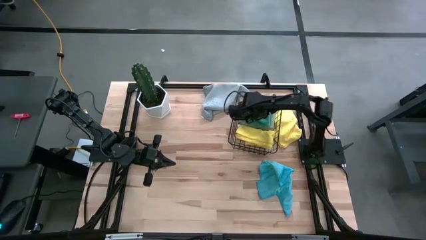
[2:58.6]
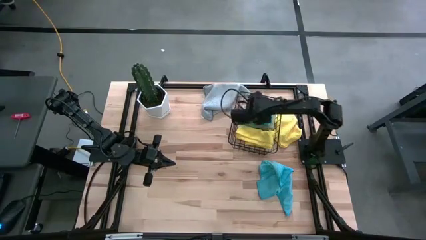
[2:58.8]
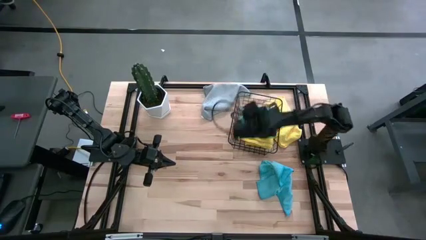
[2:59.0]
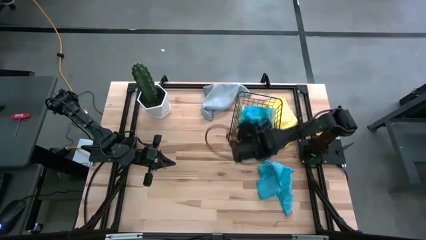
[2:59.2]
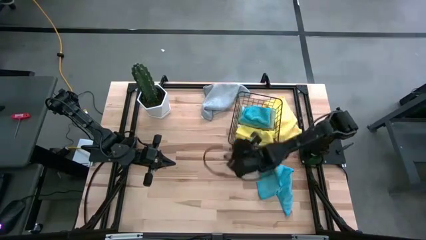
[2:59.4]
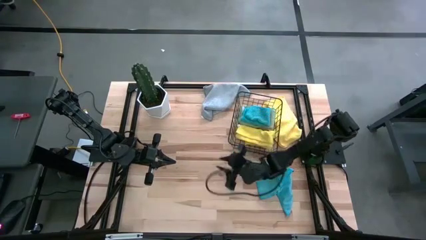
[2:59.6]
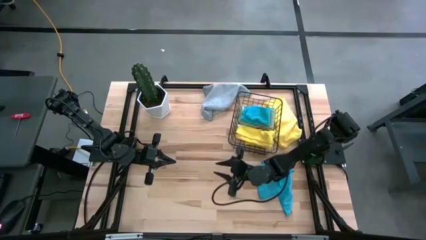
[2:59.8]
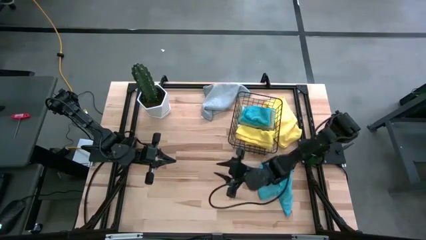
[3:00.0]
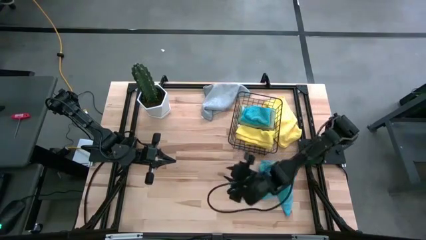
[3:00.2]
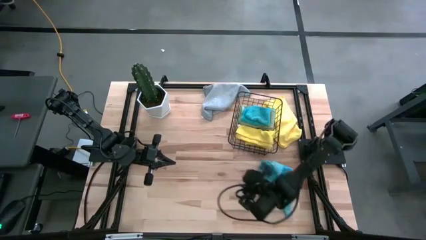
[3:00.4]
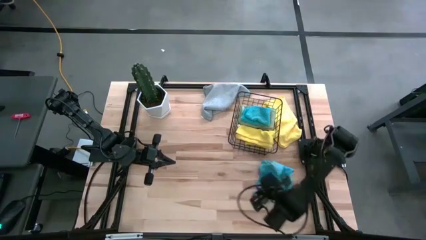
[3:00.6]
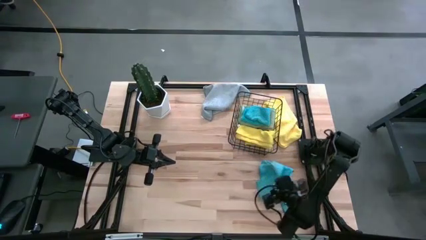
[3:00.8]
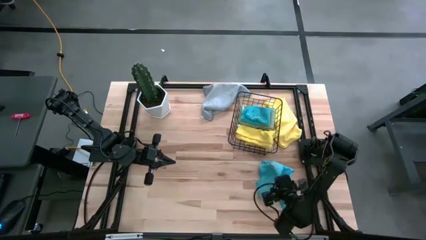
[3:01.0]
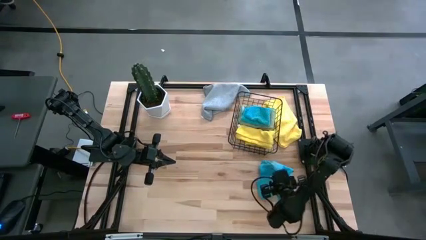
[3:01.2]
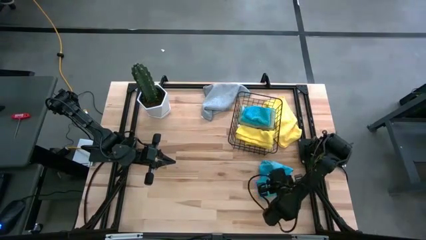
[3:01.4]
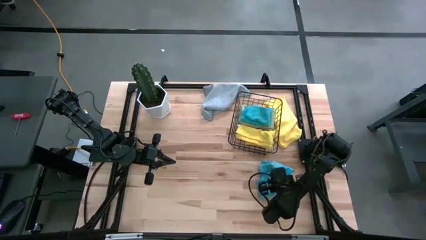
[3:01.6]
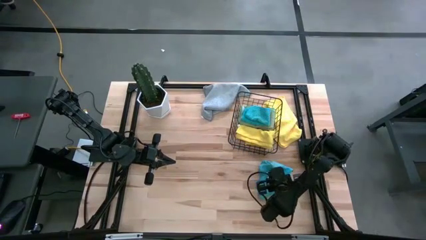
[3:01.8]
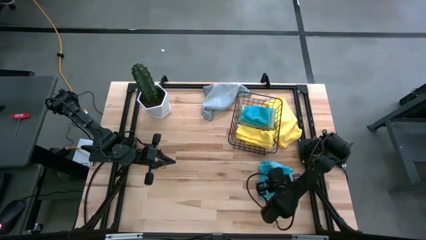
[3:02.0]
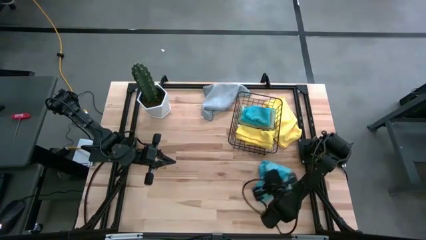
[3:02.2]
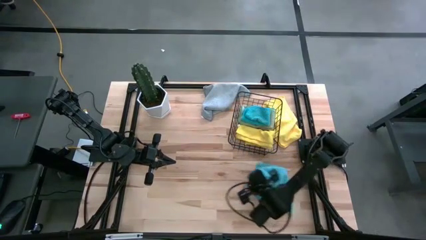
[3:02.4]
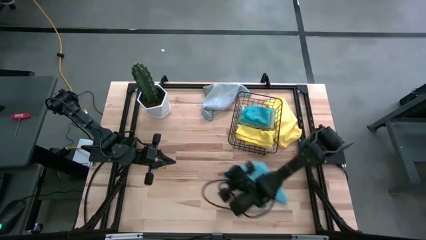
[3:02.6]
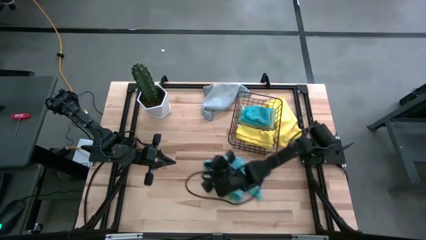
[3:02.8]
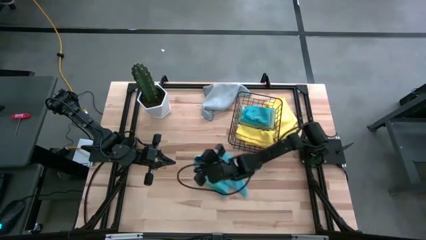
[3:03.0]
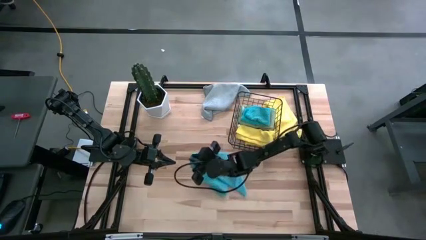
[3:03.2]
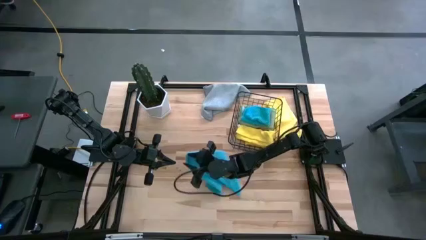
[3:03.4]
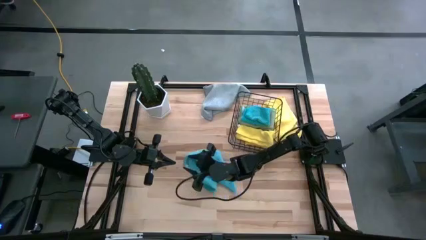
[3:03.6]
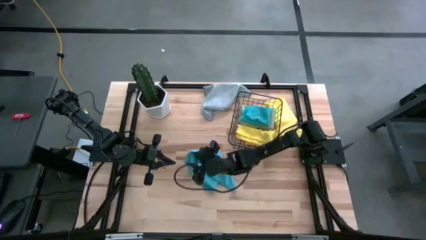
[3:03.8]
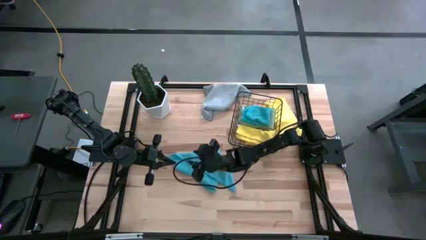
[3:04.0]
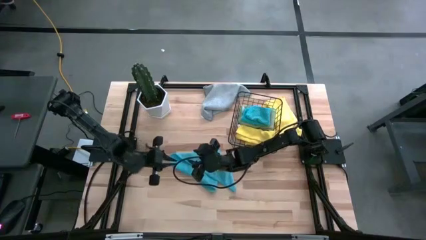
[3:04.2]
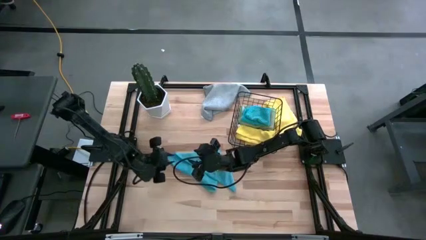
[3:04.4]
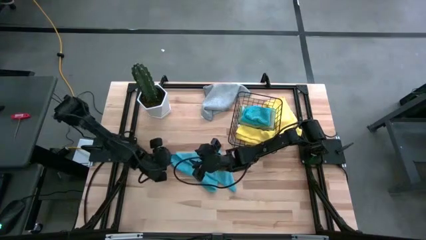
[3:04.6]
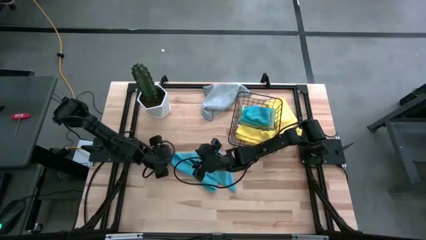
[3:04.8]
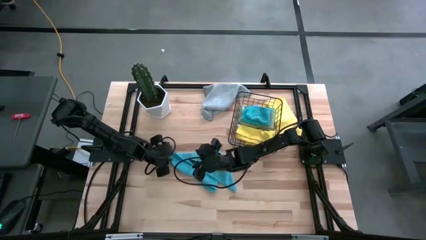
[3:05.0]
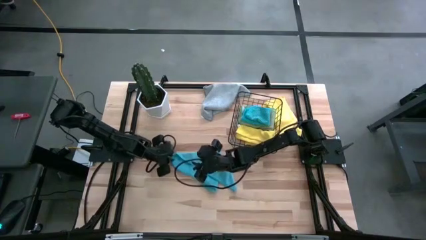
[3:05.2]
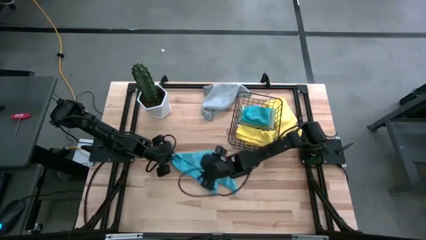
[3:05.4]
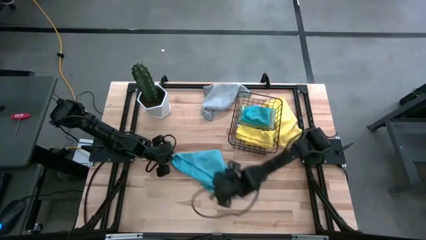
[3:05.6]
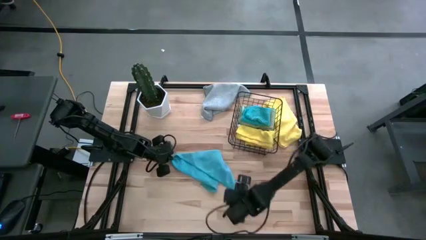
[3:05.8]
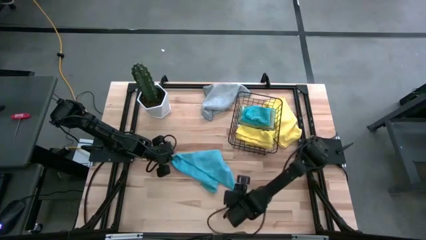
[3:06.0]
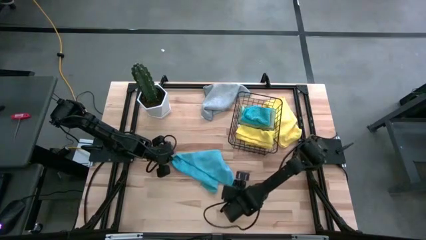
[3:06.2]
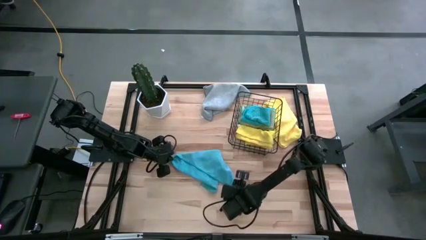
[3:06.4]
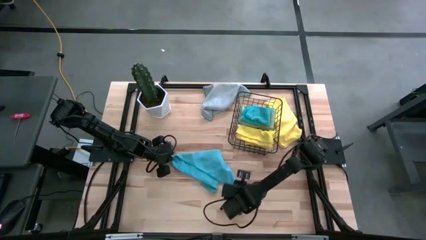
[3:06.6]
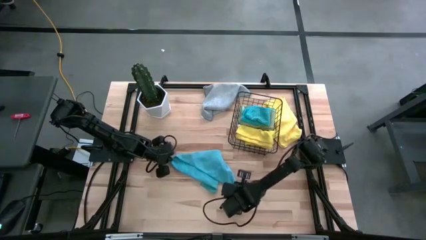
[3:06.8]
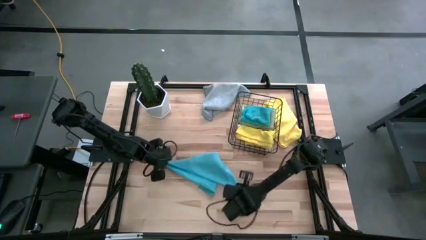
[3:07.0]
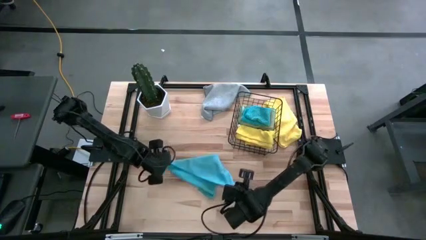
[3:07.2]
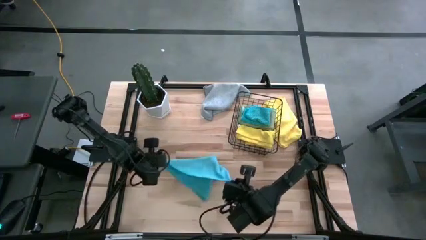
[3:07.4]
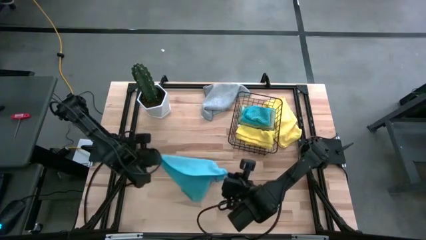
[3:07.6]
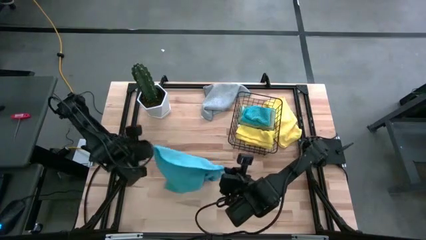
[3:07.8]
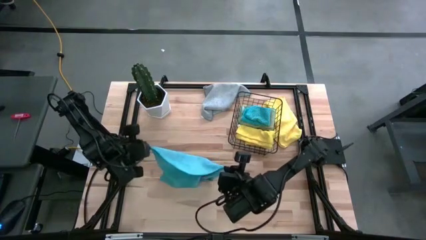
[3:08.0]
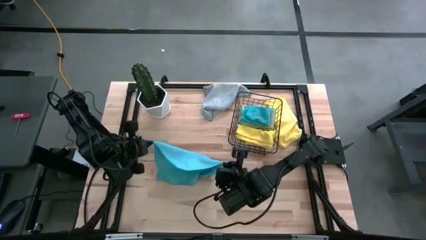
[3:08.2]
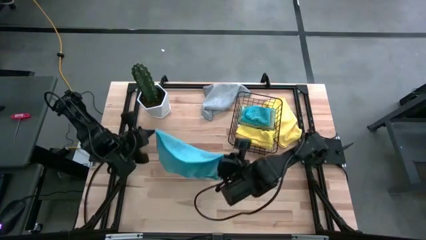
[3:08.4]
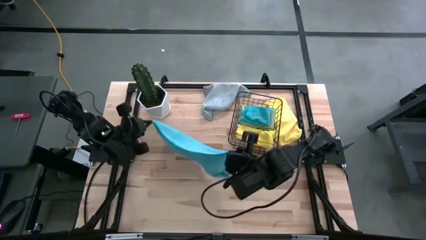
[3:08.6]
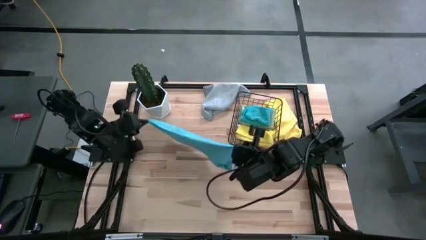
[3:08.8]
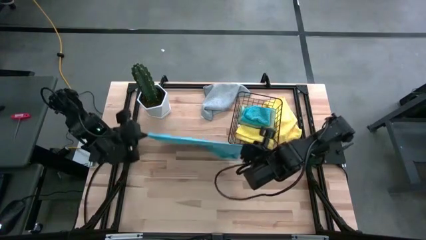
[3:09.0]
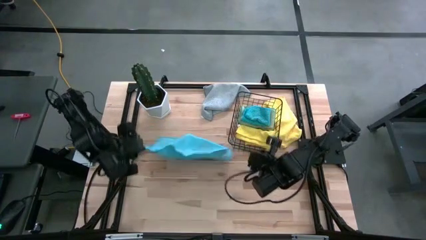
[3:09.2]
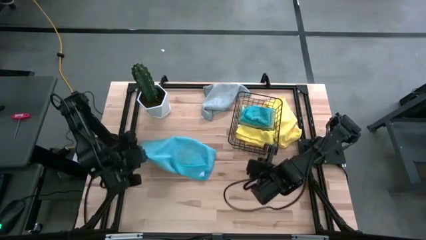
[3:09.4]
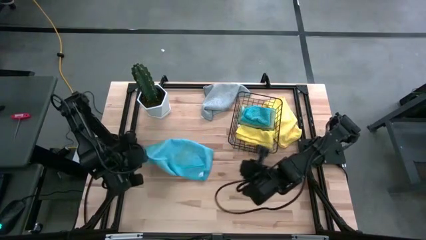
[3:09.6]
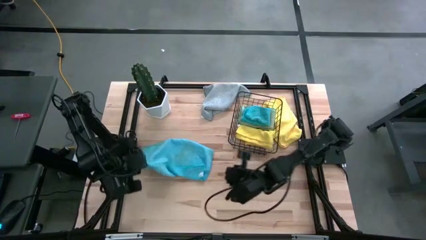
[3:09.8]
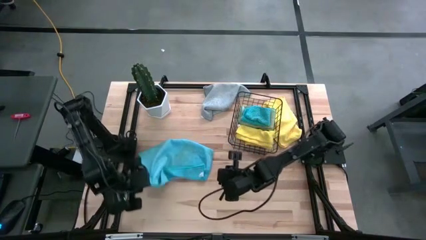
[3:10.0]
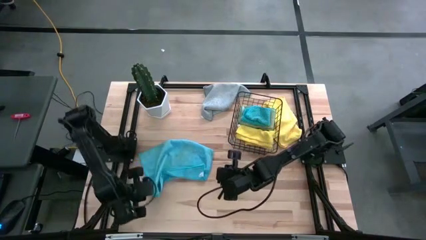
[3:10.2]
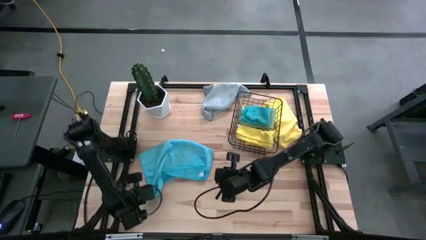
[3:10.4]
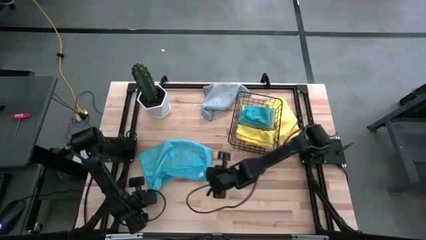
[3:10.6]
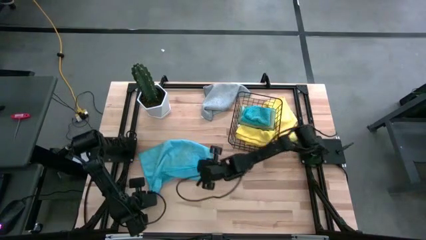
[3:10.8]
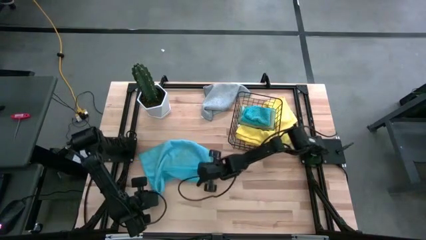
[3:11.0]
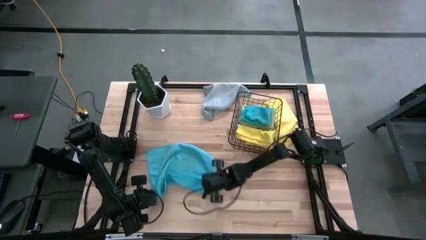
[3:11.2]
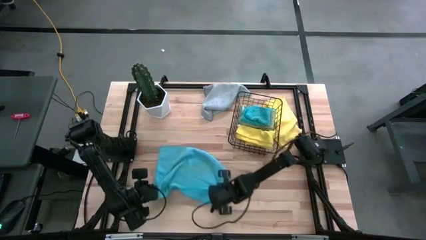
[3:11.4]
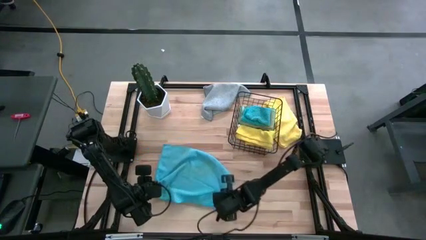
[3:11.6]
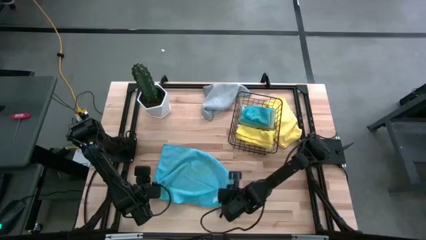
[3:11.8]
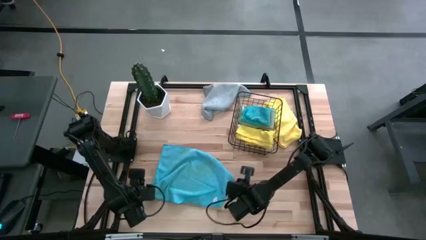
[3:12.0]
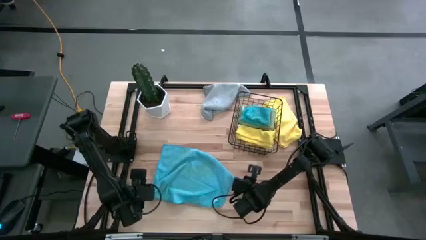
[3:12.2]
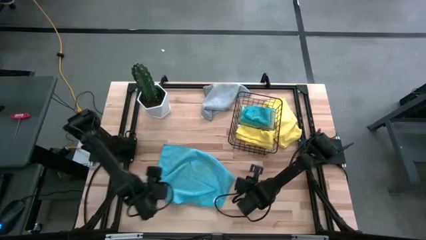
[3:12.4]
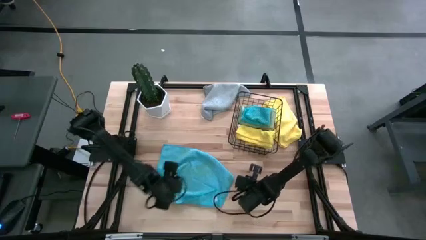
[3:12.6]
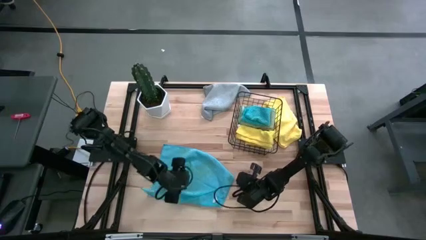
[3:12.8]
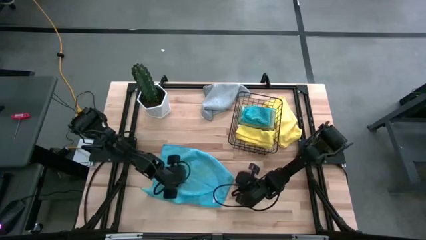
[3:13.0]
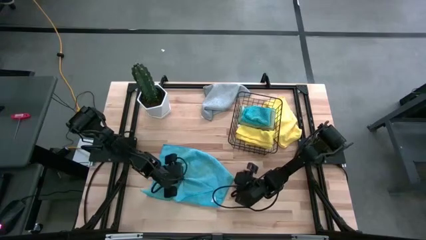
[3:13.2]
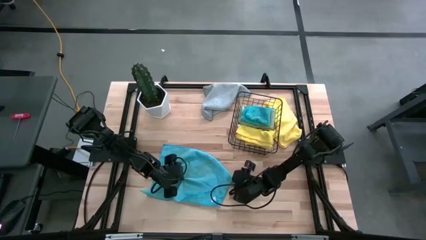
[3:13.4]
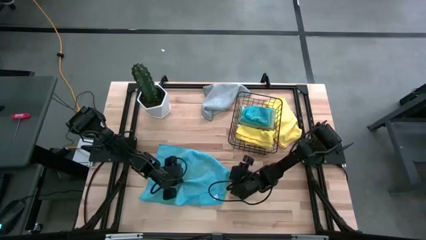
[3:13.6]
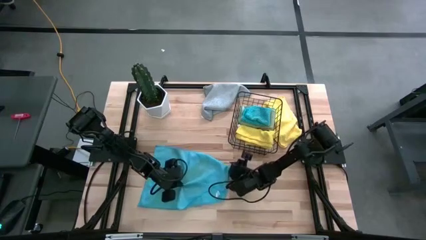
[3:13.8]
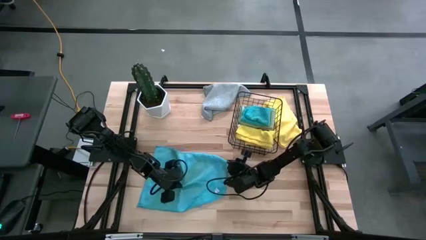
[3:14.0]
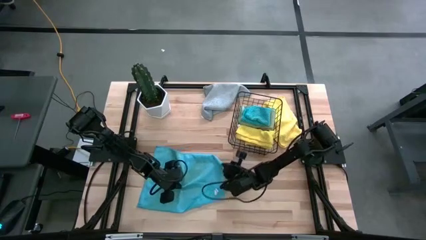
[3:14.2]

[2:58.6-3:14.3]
Task: Fold microfiber towels
Fold the blue microfiber towel
